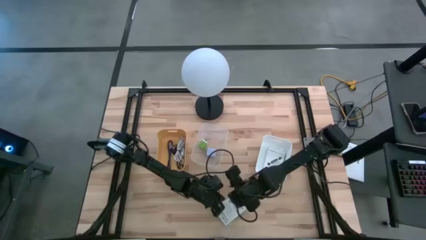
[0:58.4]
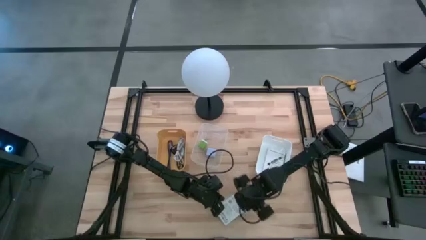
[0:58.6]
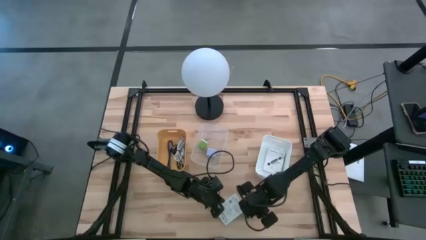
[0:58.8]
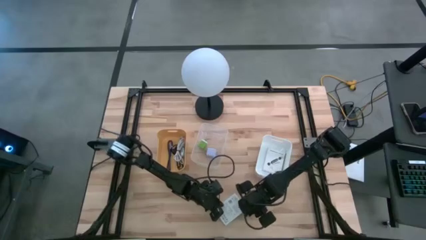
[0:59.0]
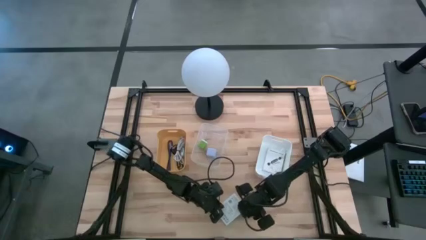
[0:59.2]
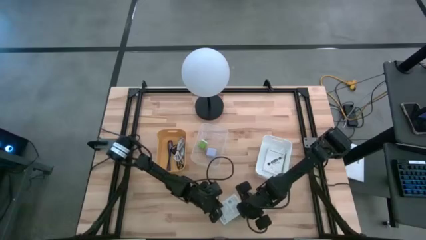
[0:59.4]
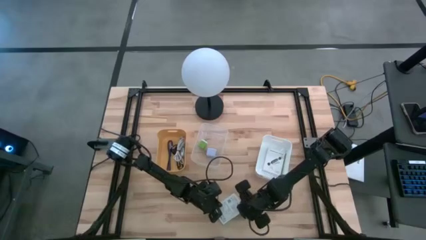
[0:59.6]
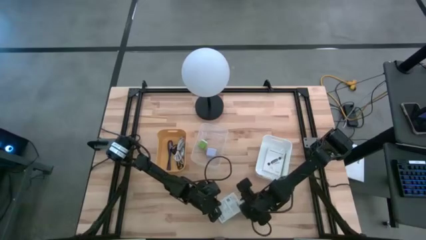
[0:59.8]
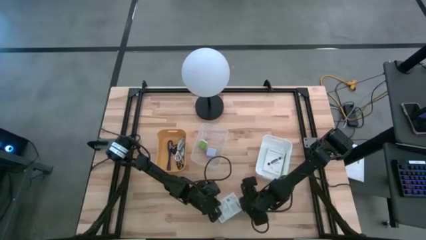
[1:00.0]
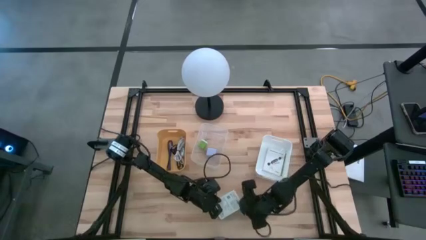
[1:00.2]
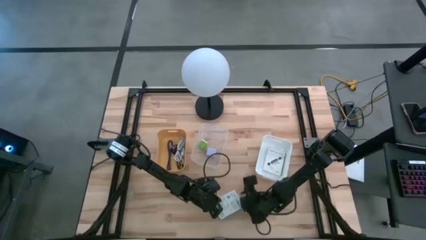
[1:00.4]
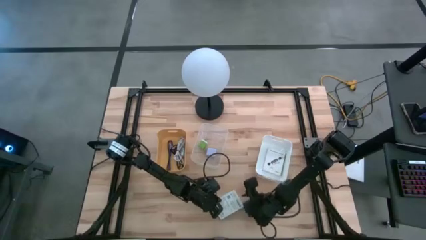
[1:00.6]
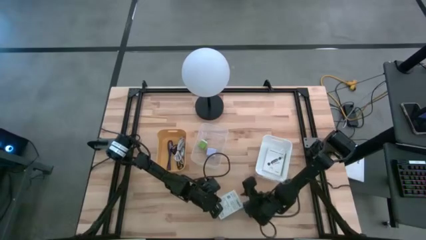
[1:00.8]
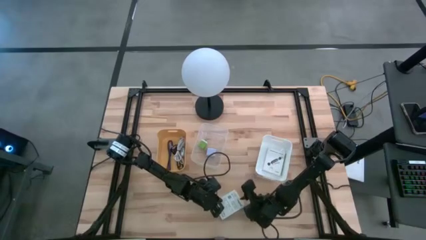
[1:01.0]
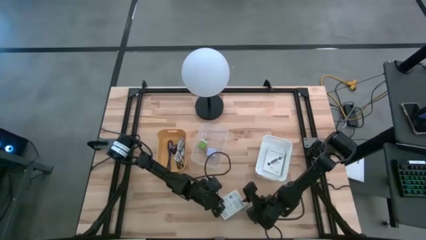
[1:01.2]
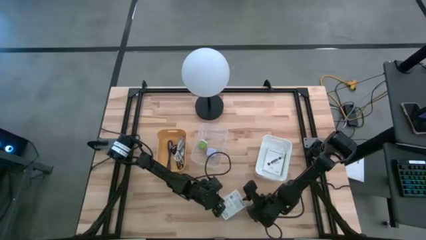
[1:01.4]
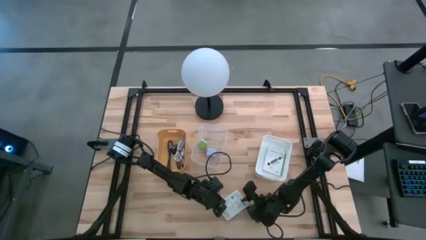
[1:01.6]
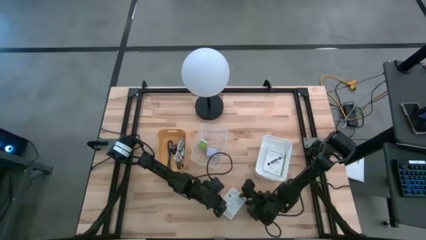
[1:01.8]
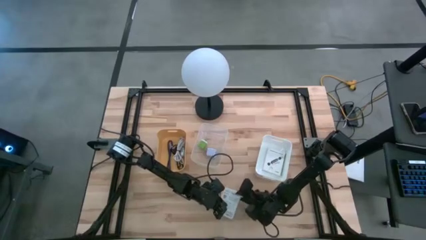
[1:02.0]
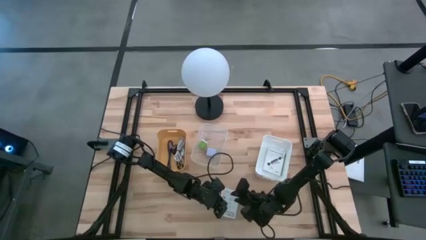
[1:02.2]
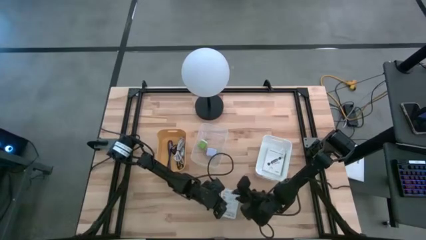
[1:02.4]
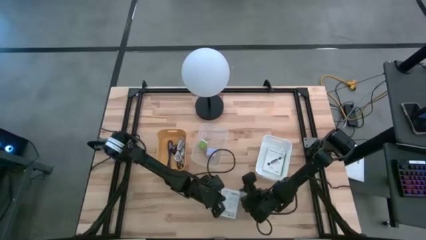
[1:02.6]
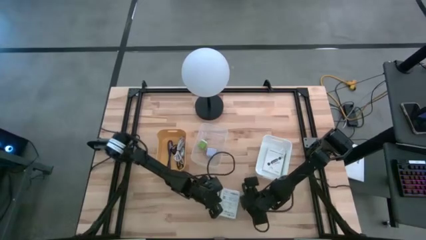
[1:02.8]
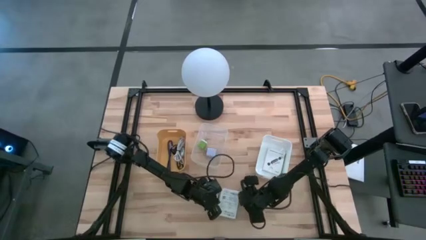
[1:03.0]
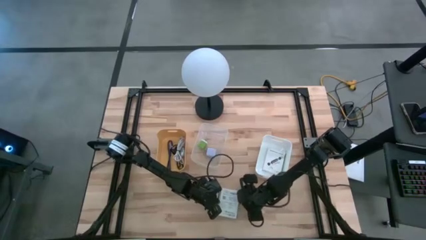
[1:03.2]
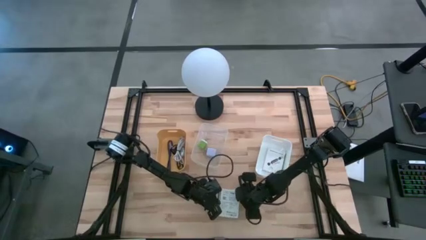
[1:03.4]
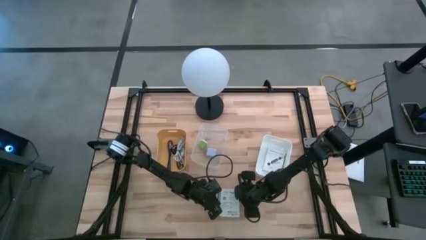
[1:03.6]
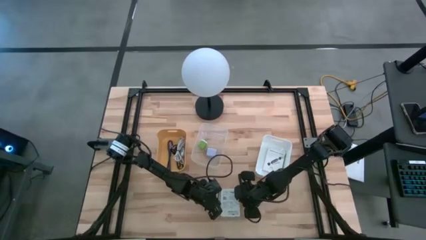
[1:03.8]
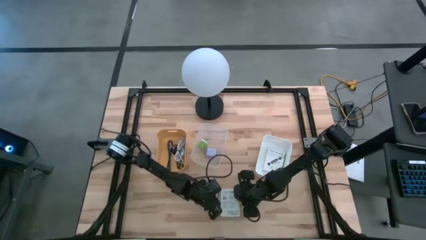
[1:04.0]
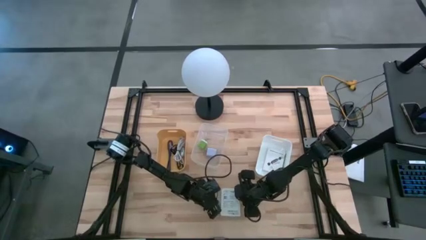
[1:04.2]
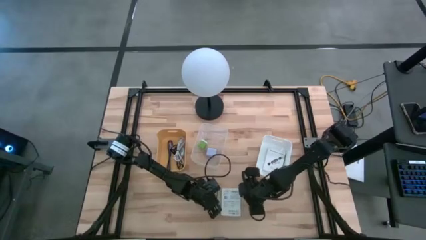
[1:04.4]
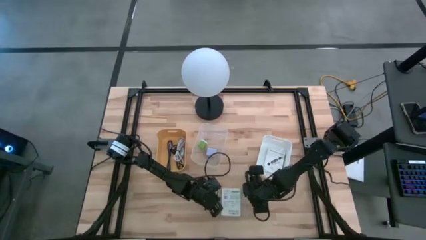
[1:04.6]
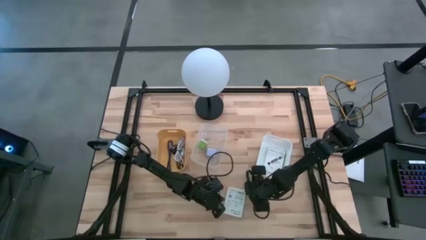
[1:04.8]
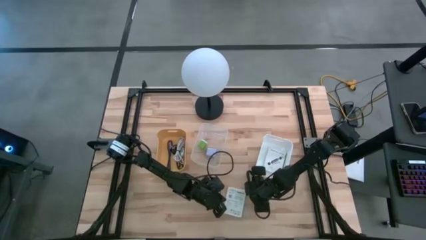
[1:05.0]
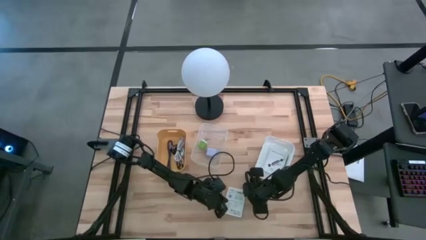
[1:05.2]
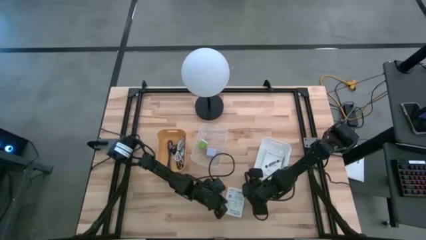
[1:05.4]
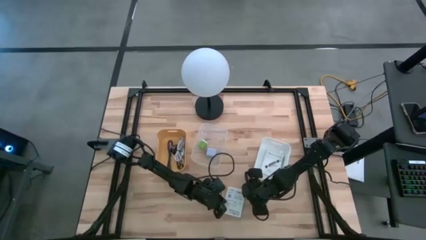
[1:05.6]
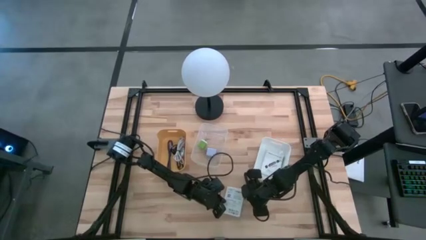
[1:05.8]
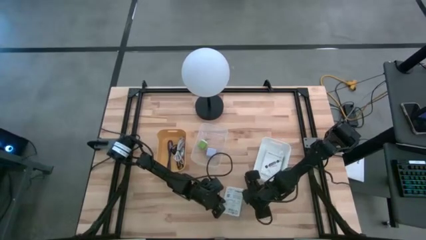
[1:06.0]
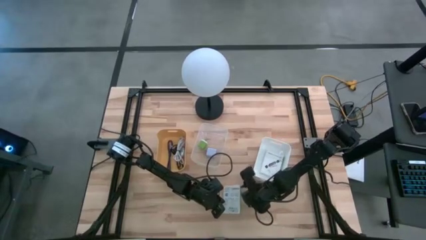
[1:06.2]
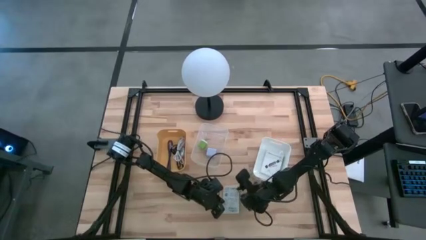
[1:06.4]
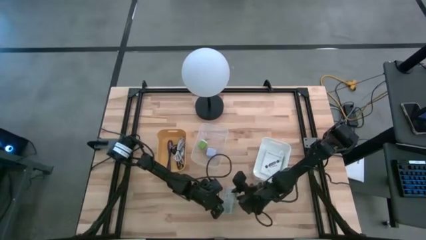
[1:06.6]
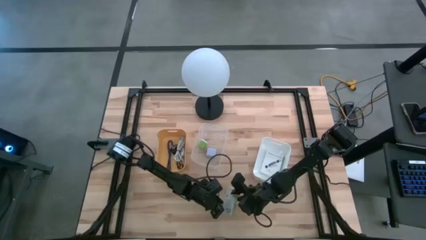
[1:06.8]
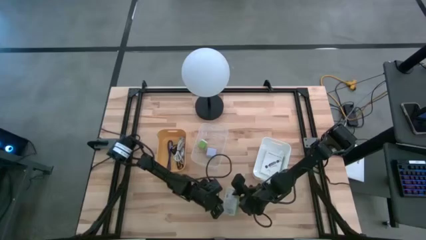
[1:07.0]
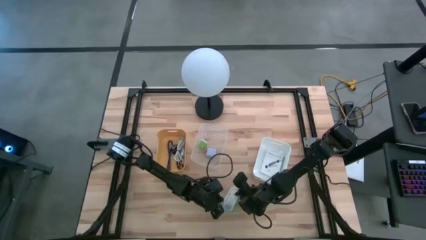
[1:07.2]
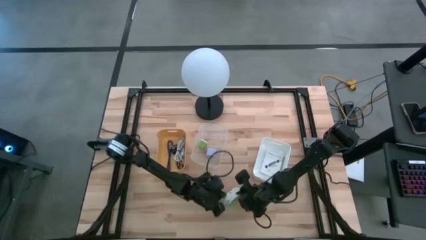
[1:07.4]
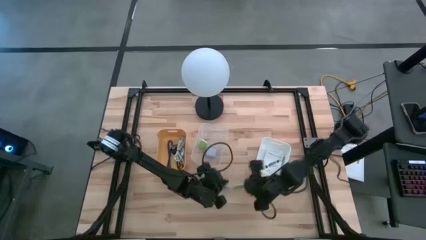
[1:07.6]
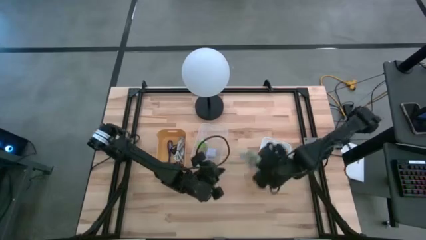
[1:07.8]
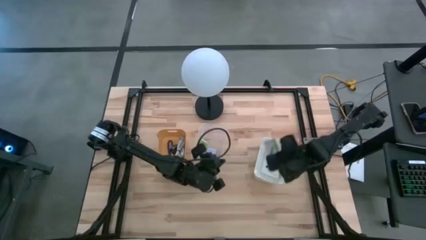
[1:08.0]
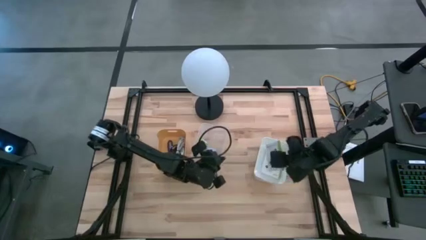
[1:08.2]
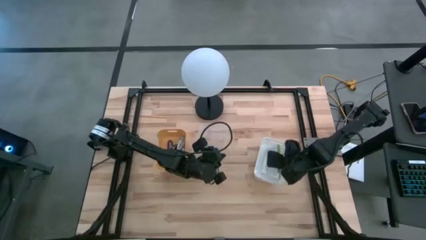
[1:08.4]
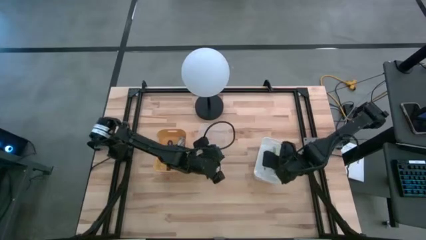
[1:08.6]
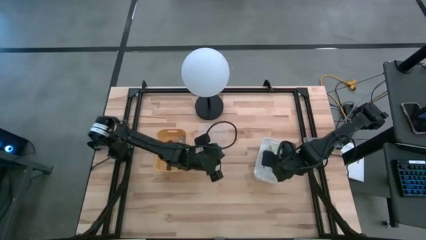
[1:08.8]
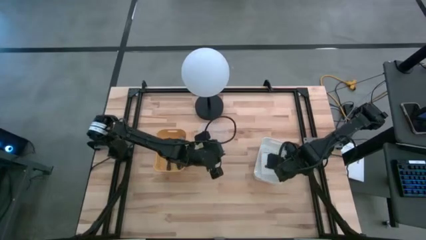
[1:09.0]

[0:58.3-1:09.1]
Task: Pick and place items into bin
Put the card reader box into the white bin

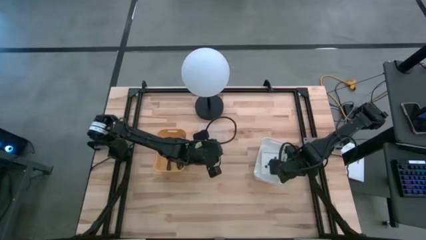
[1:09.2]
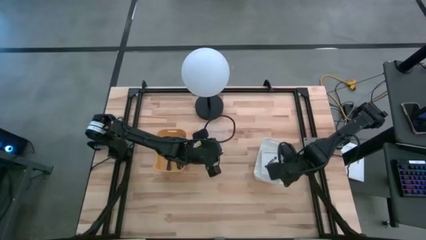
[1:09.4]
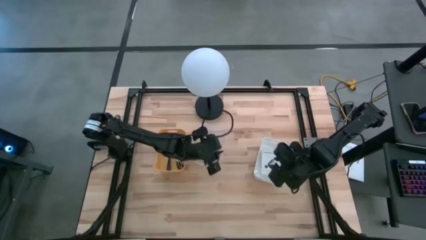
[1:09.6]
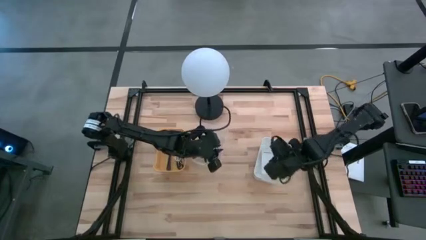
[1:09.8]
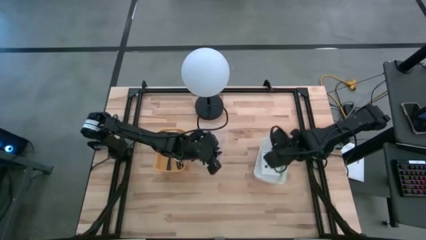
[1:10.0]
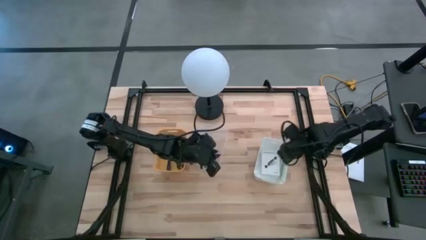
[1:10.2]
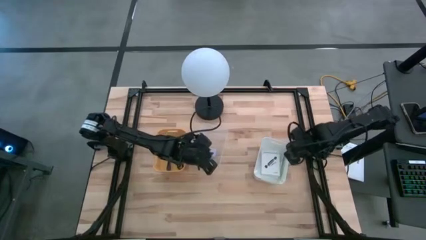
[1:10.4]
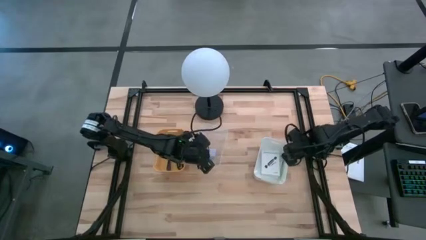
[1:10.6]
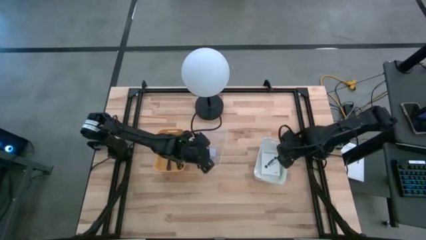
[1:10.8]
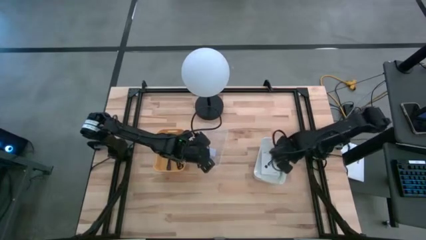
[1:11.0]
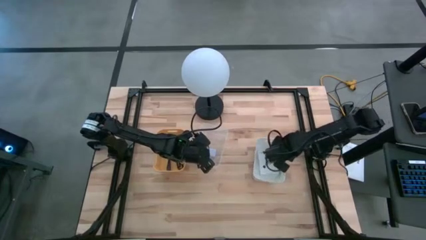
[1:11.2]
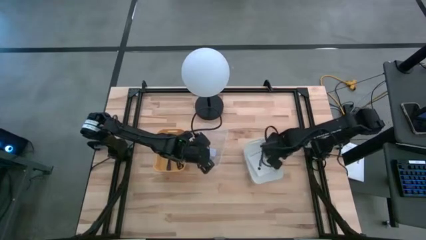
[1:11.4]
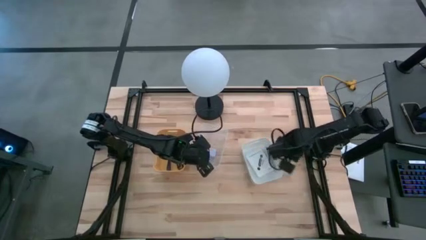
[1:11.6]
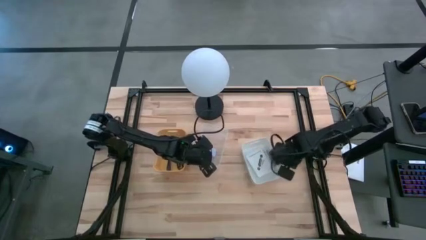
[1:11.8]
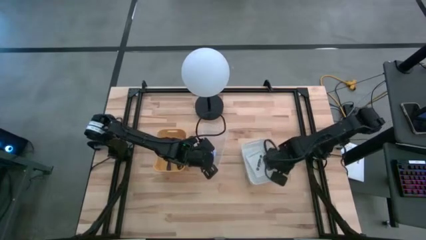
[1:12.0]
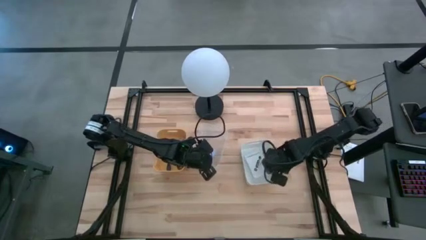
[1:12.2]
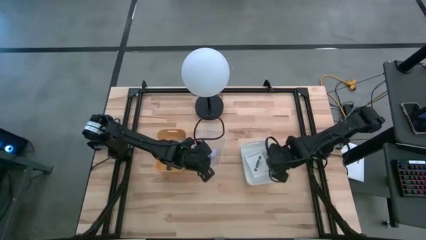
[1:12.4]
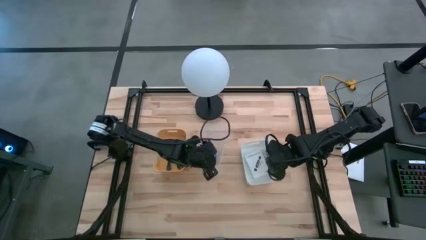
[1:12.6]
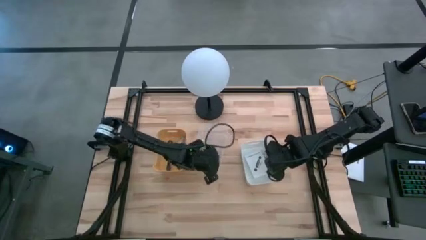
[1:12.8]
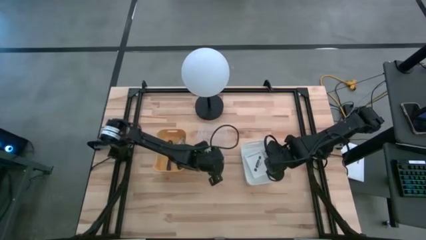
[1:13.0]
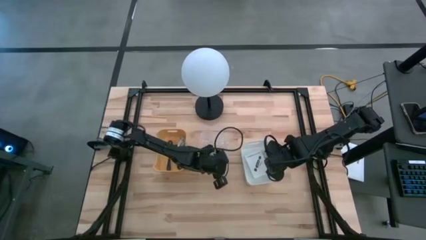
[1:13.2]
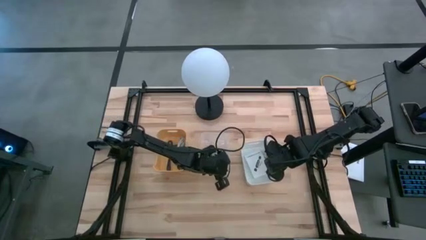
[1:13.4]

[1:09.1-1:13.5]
Adjust the bins

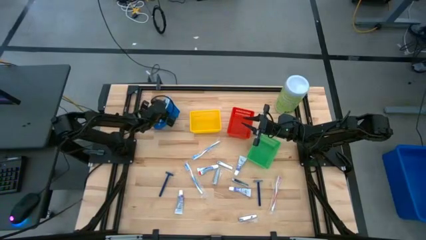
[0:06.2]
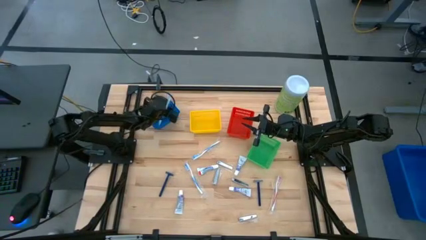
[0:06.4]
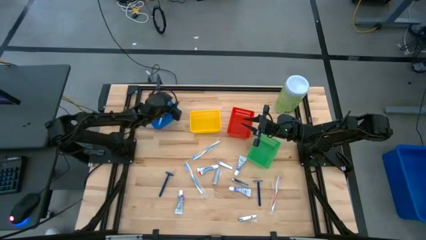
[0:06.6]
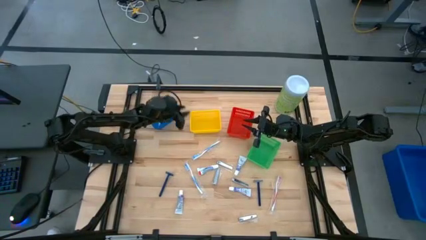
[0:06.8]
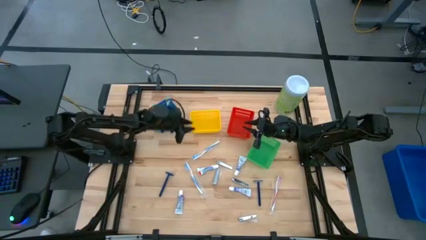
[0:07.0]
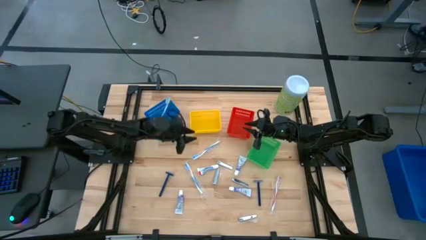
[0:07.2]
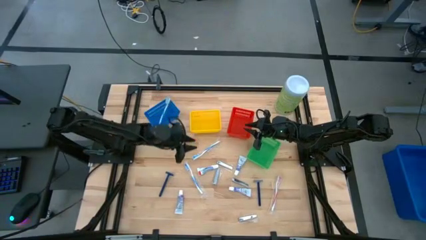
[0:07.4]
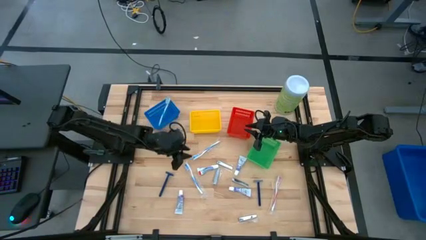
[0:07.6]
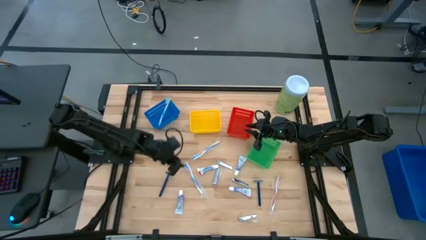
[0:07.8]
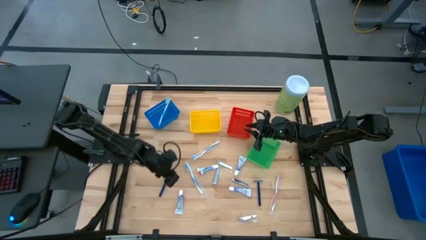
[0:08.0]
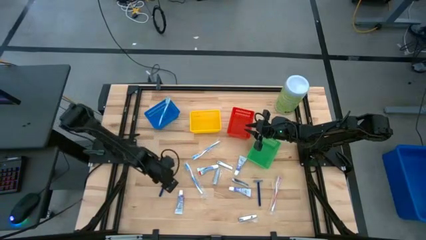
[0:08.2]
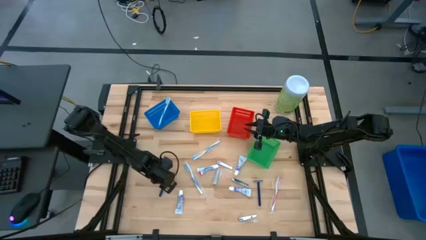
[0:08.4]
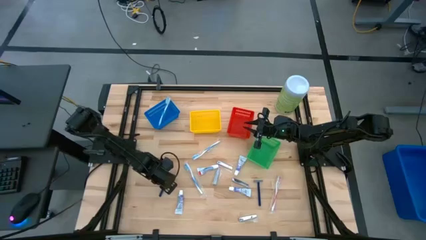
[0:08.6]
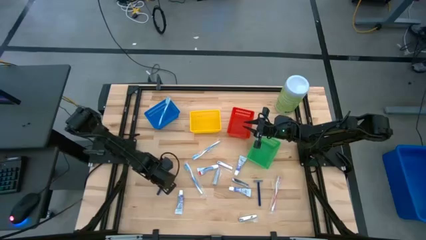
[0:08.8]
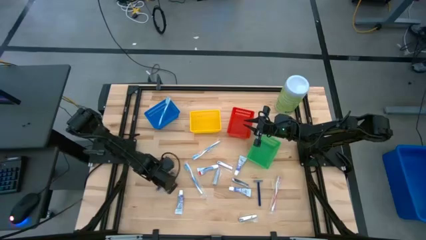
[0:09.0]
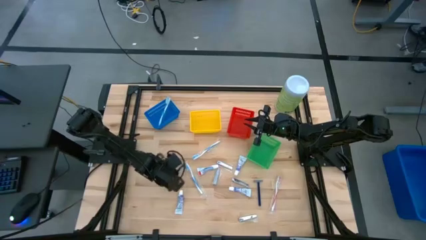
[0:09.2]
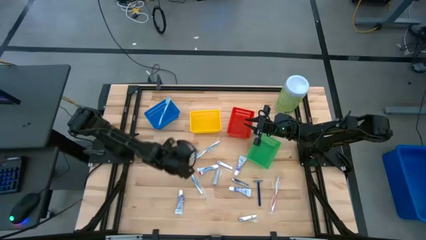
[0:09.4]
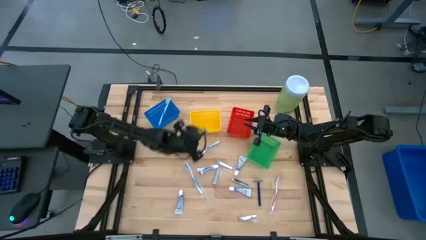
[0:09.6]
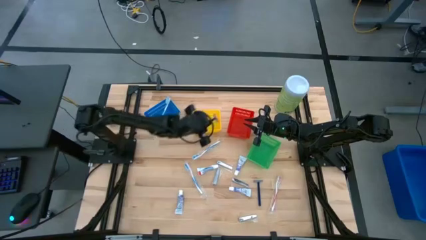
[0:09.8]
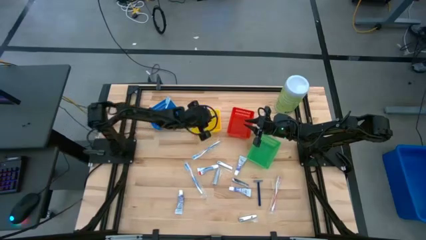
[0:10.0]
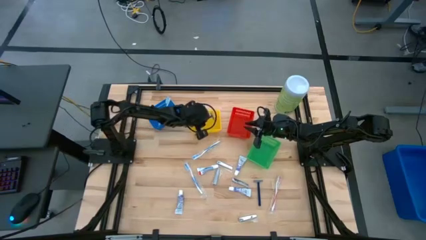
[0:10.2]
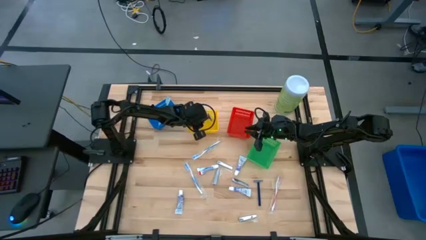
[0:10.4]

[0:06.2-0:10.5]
Task: Pick & Place Travel size toiletries
Put the blue razor into the yellow bin
